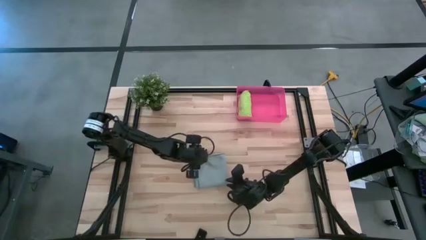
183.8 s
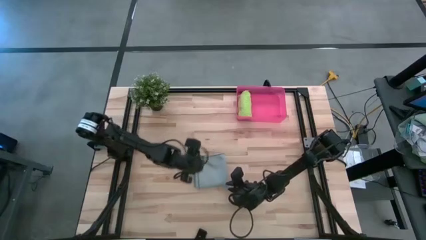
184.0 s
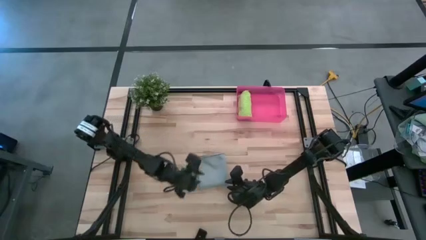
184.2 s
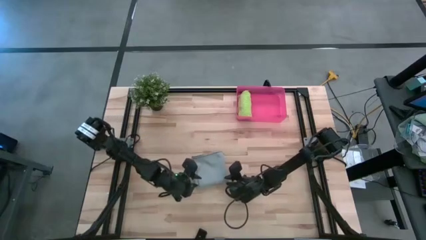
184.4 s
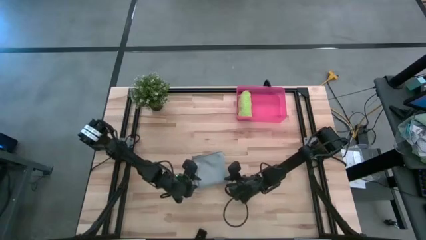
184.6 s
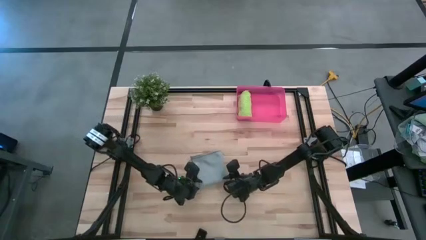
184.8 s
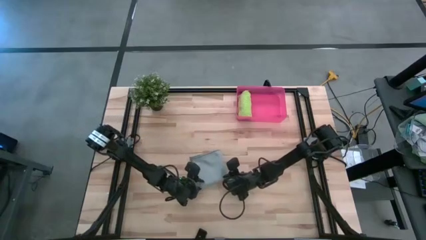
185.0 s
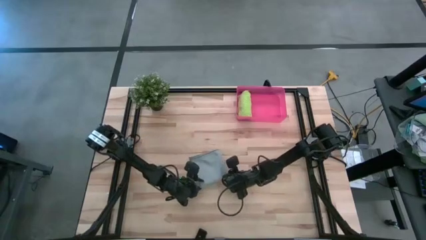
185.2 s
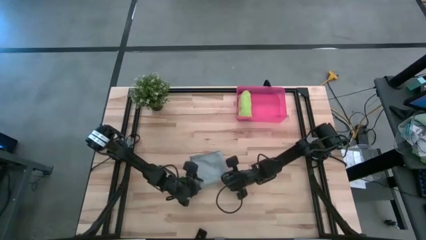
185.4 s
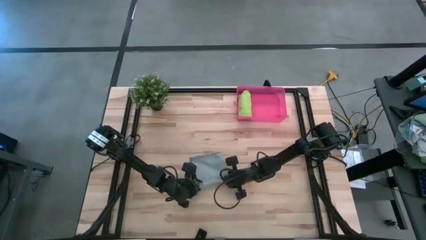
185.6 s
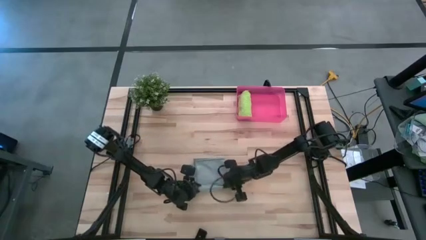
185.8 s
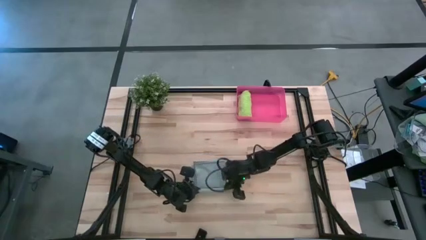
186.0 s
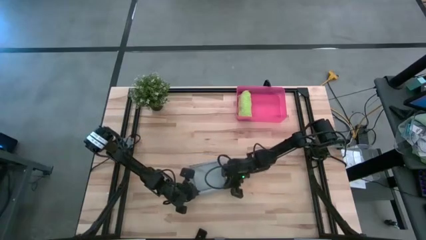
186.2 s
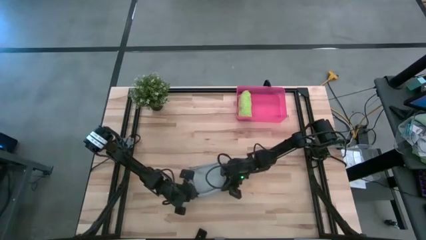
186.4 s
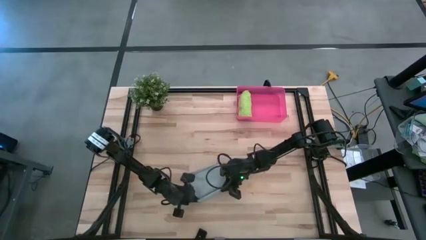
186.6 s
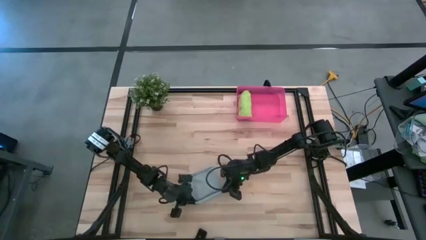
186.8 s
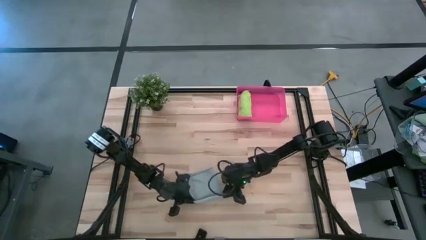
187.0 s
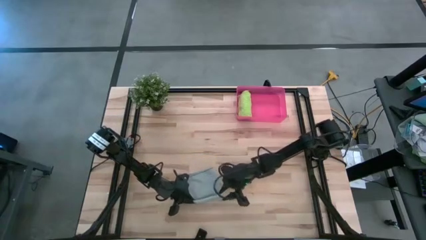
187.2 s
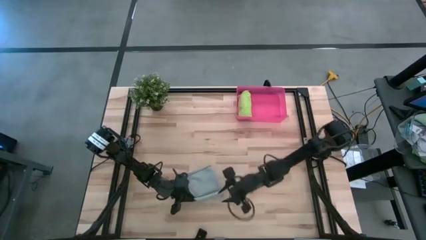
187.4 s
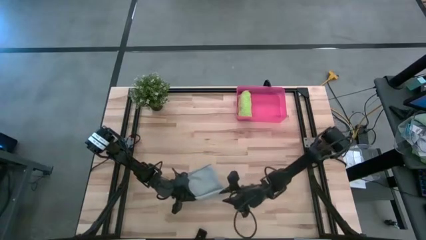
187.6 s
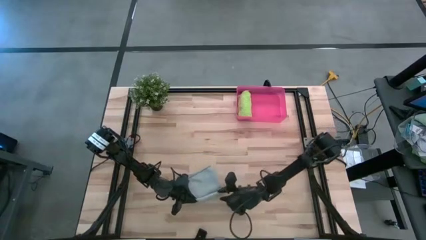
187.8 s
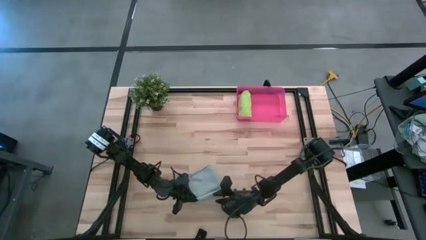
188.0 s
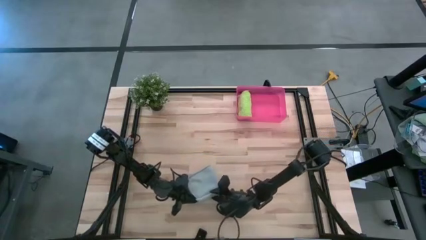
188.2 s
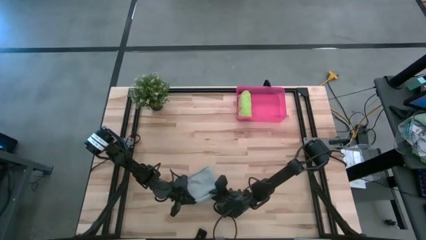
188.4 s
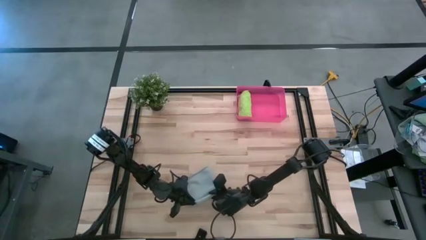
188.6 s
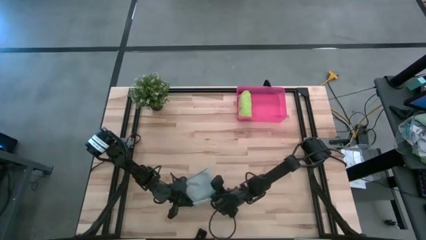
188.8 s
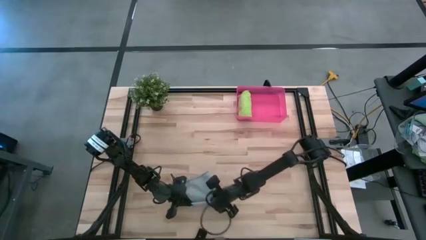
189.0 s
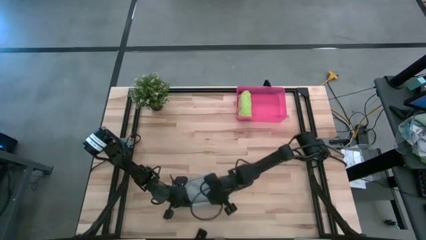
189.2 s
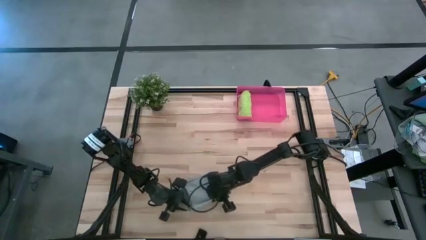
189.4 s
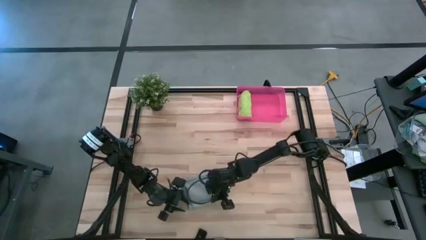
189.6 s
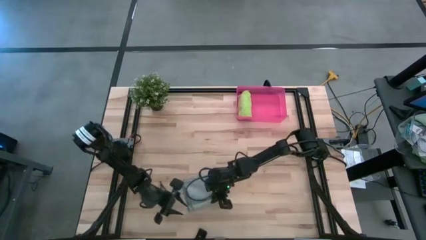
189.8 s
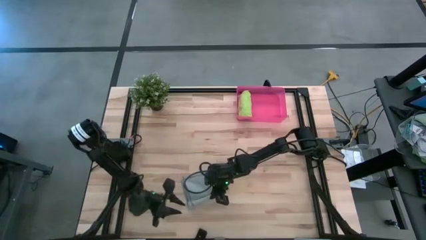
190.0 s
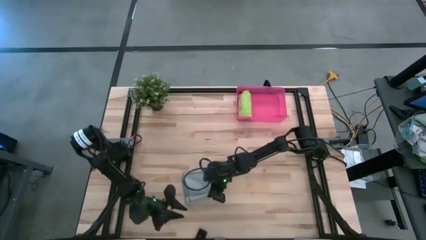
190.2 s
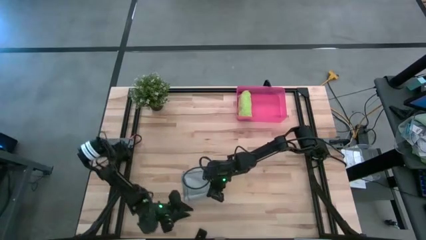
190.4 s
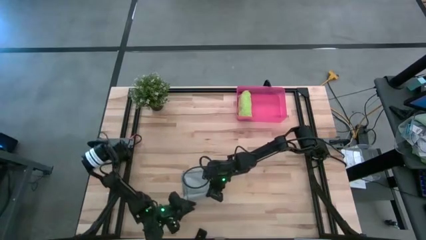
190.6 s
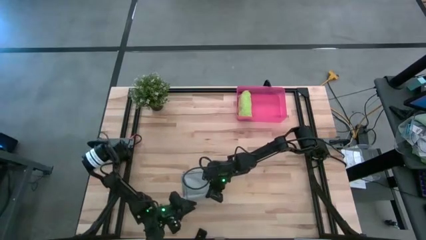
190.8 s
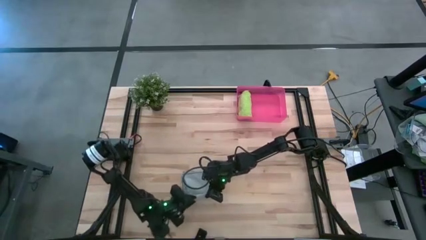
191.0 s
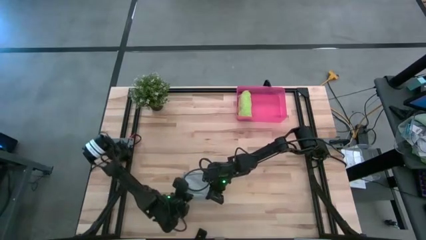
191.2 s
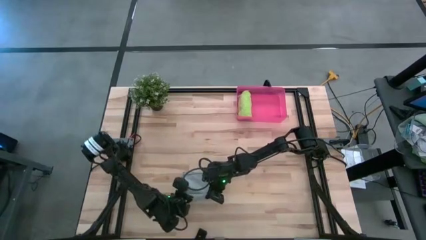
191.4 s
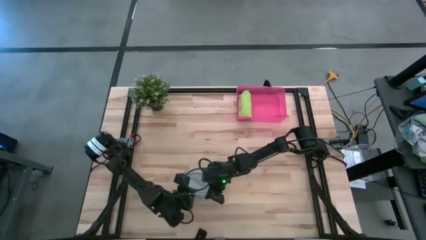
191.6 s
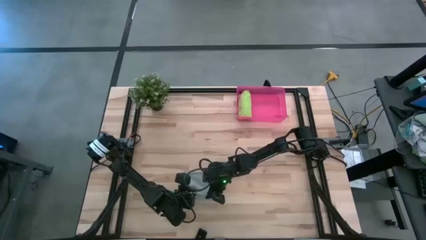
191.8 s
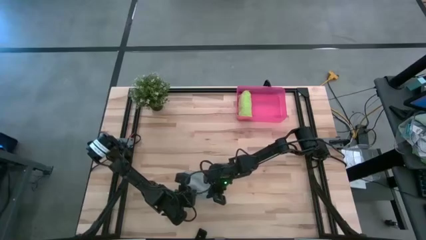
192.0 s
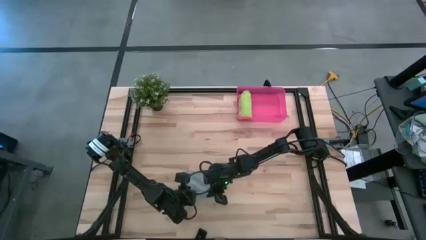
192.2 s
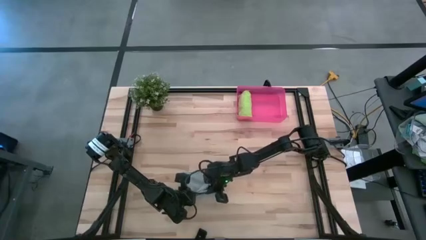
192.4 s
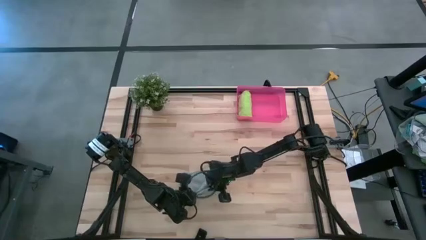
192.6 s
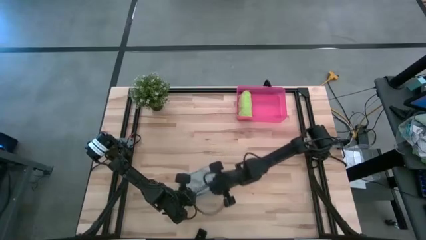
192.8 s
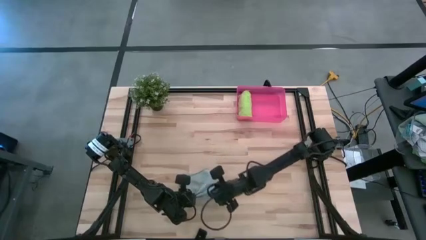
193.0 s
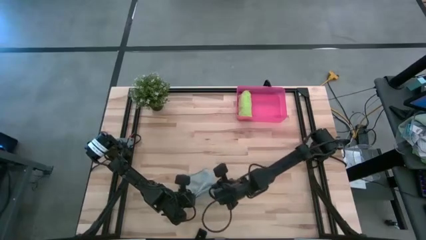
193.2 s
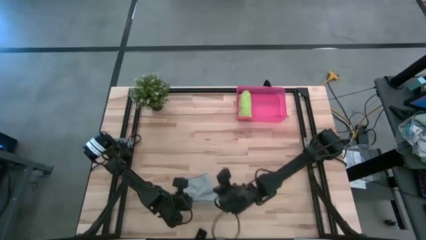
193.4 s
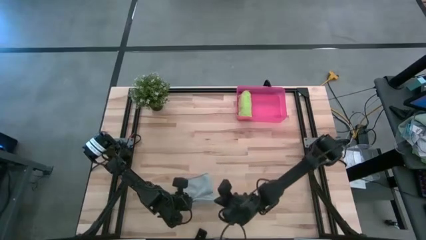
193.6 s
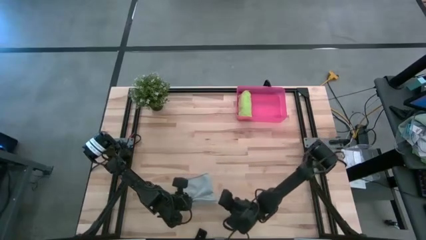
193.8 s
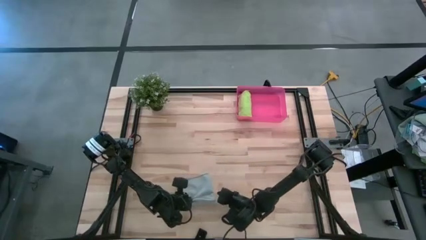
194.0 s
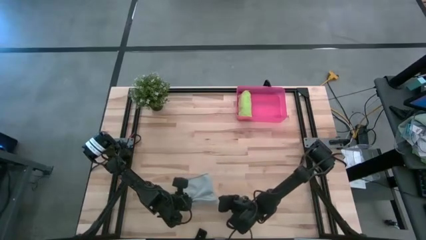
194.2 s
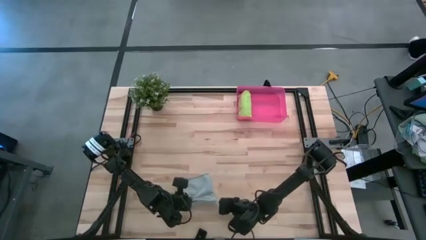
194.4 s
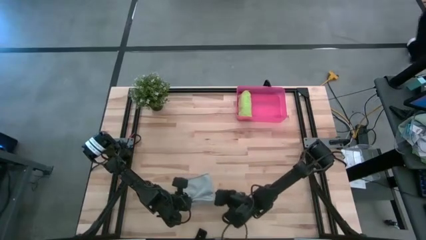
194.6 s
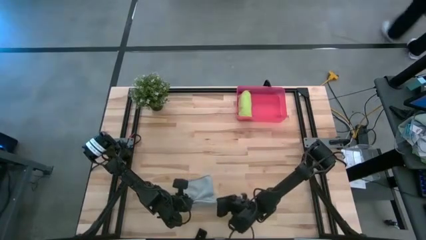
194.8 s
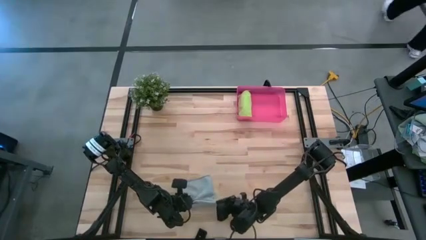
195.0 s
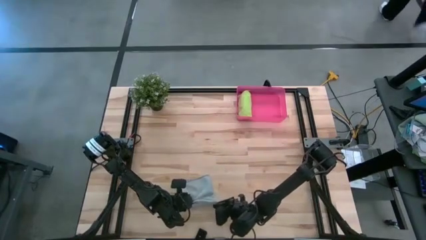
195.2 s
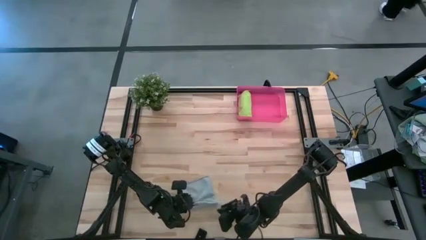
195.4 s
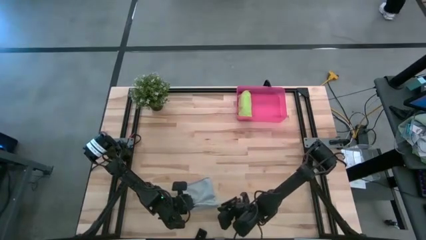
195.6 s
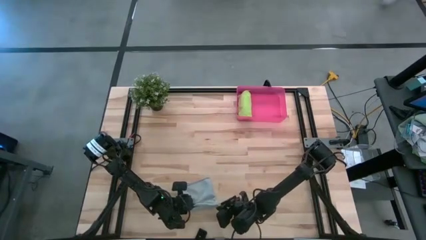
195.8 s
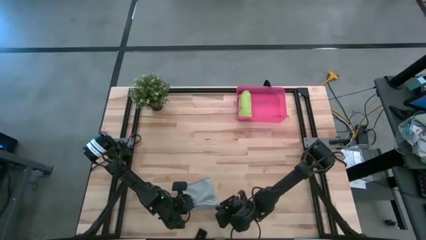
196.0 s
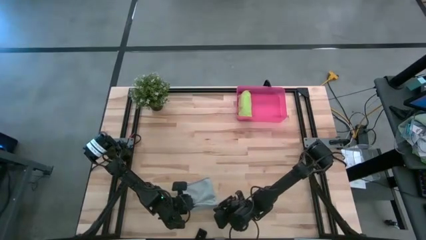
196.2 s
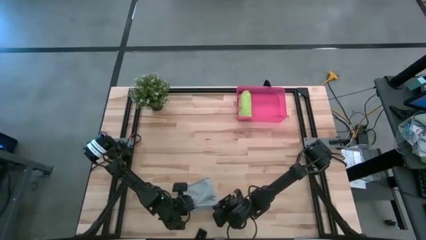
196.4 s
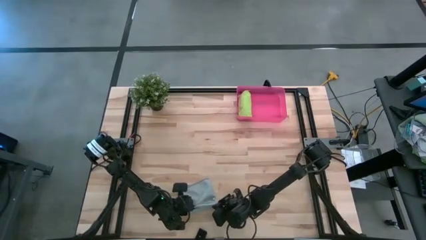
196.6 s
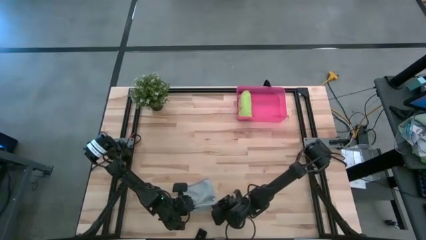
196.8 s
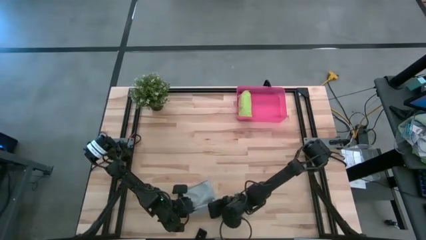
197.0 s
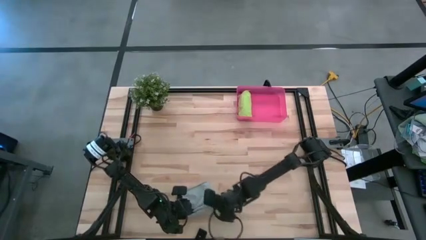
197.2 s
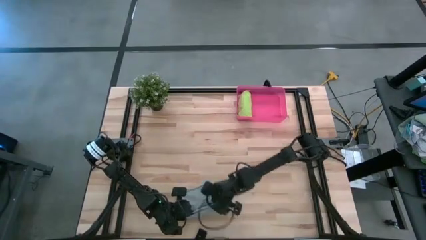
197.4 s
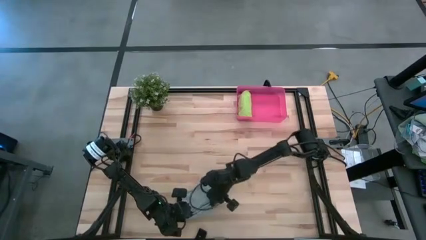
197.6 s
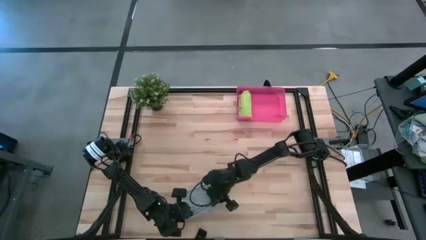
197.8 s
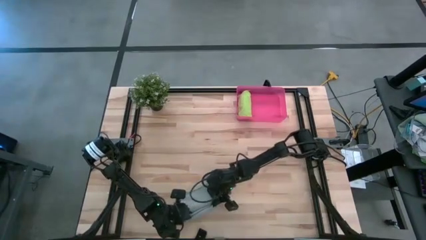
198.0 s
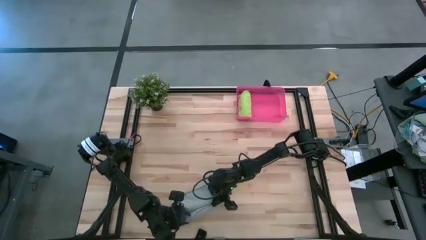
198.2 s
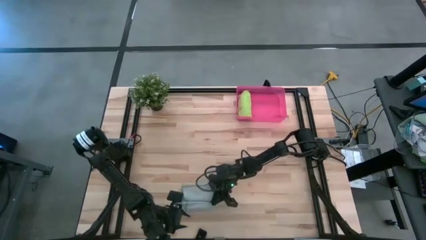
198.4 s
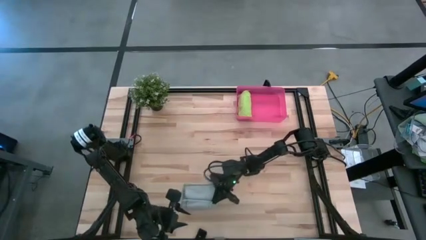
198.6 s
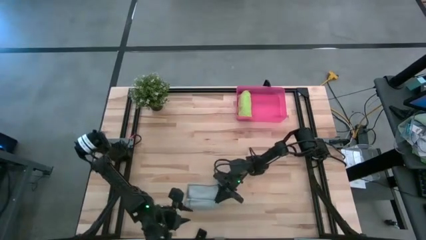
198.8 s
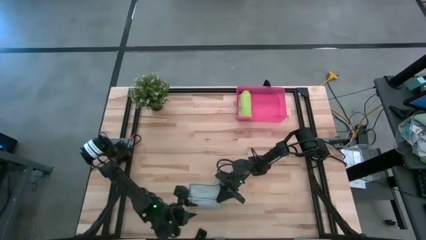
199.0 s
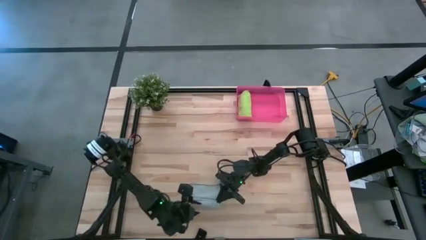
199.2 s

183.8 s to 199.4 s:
Task: Roll microfiber towels into tight, uniform cylinder then place into a basket
Roll the gray microfiber cloth
